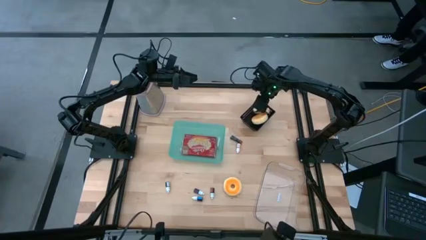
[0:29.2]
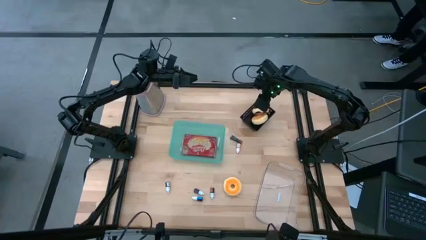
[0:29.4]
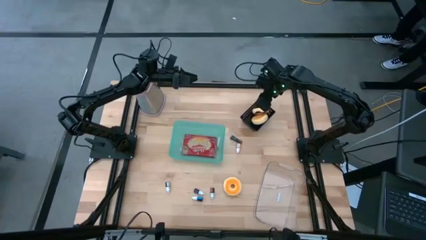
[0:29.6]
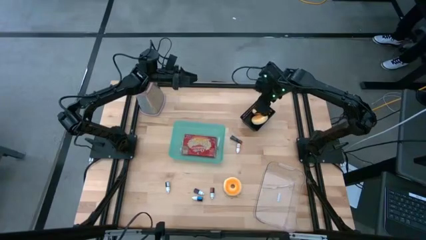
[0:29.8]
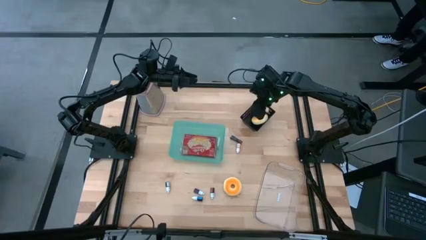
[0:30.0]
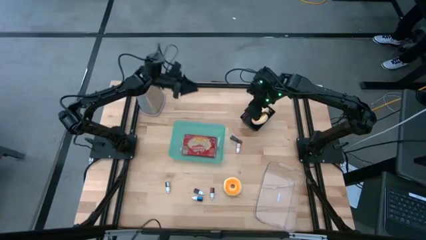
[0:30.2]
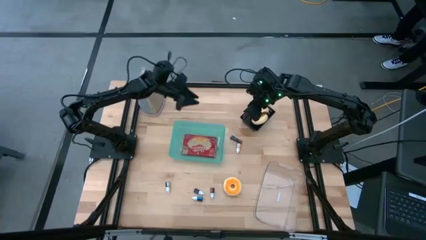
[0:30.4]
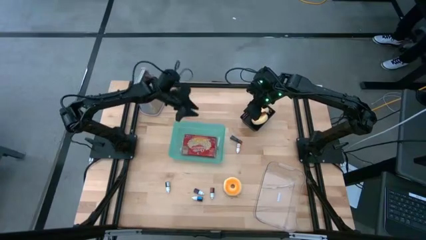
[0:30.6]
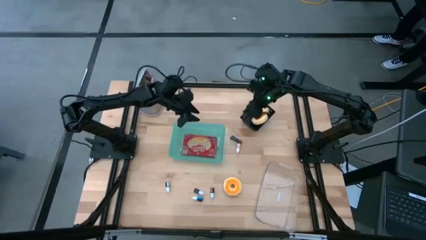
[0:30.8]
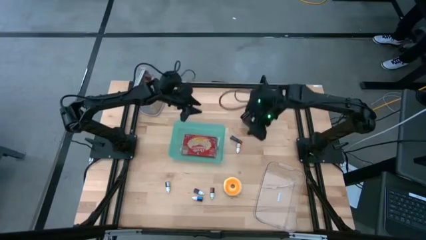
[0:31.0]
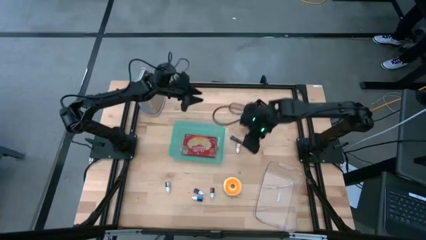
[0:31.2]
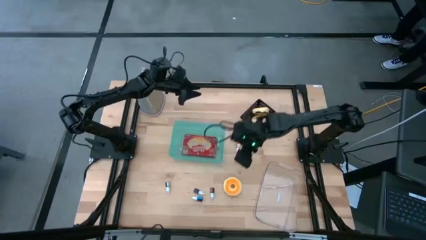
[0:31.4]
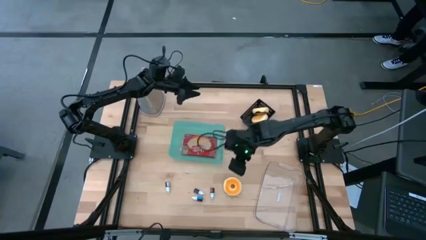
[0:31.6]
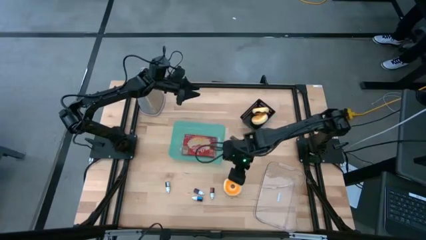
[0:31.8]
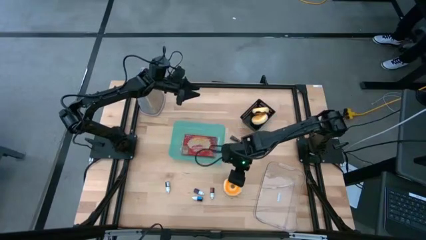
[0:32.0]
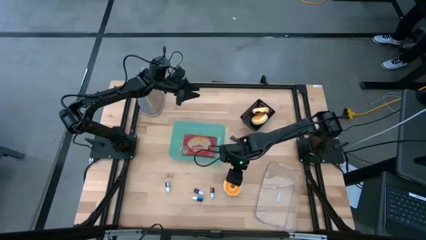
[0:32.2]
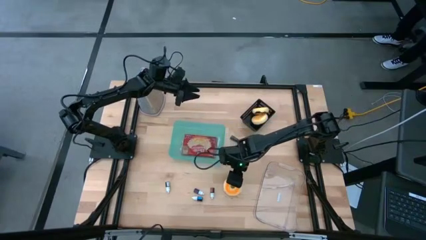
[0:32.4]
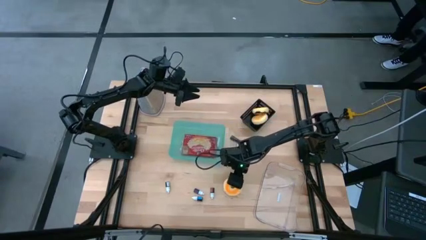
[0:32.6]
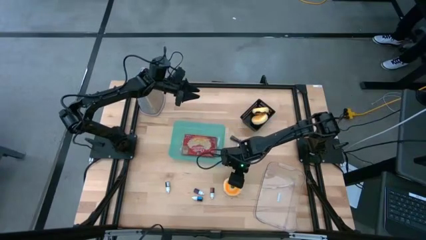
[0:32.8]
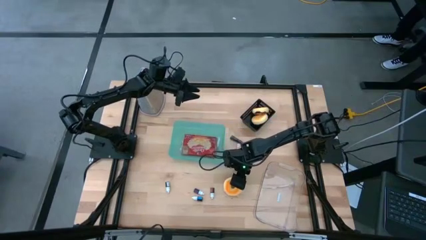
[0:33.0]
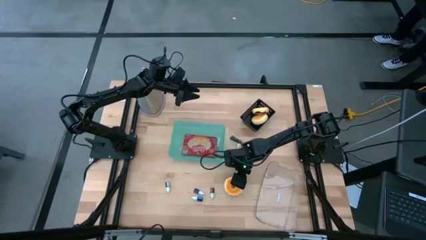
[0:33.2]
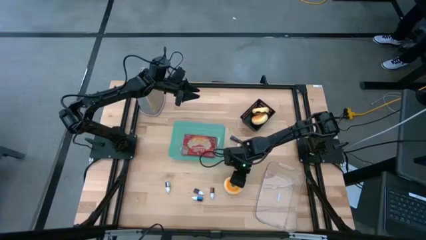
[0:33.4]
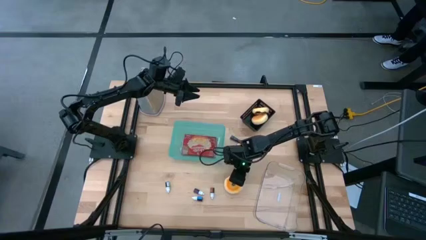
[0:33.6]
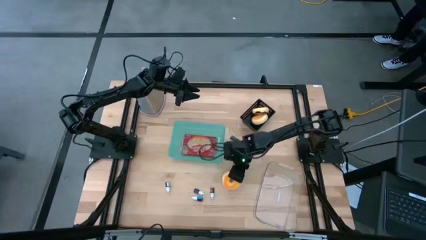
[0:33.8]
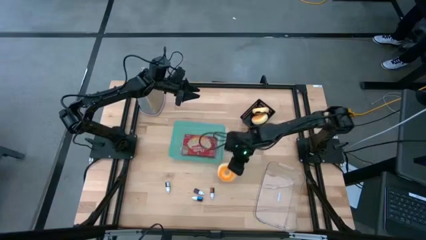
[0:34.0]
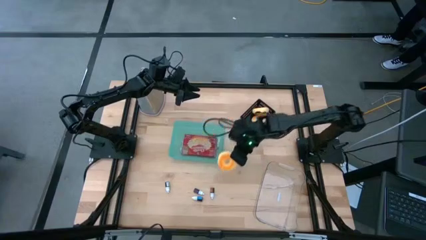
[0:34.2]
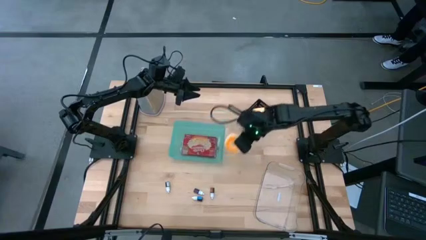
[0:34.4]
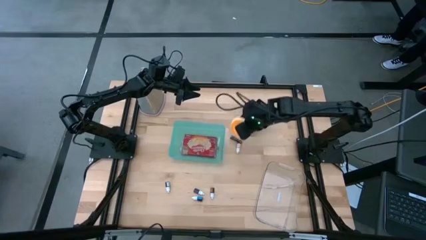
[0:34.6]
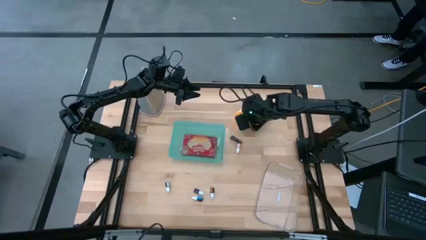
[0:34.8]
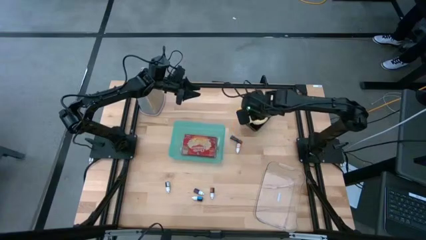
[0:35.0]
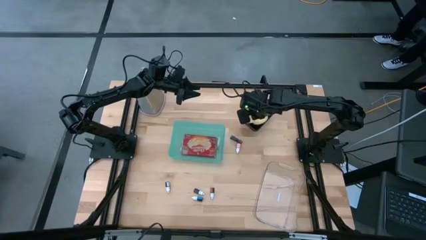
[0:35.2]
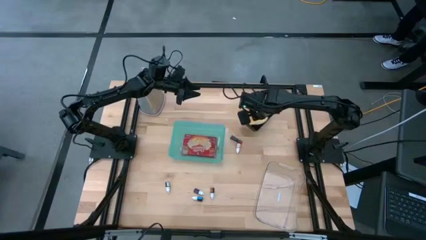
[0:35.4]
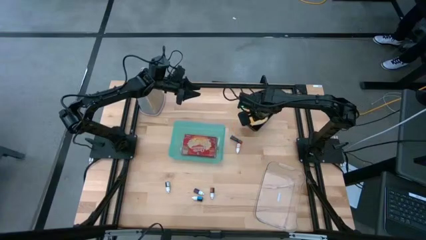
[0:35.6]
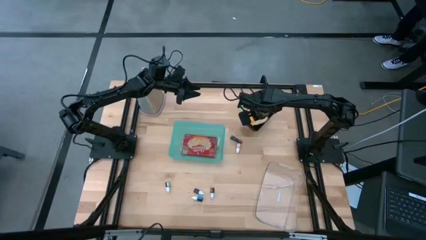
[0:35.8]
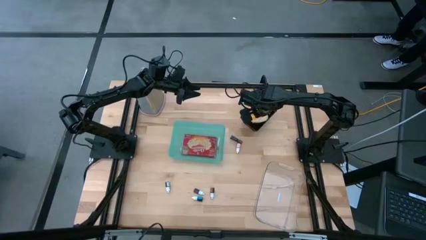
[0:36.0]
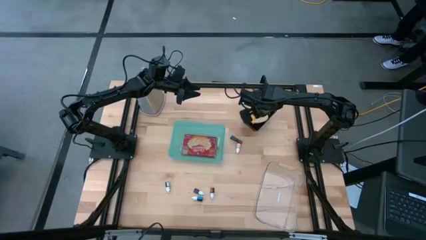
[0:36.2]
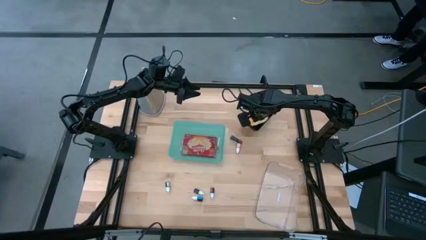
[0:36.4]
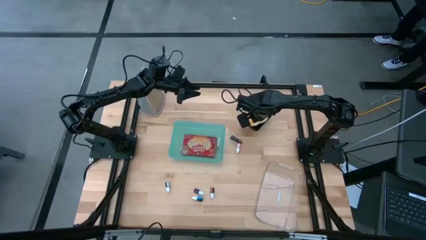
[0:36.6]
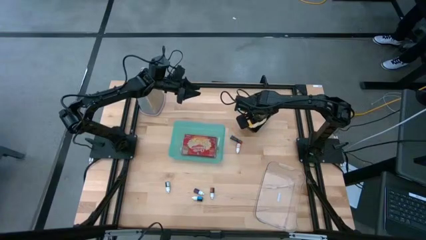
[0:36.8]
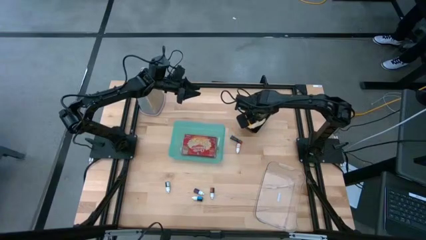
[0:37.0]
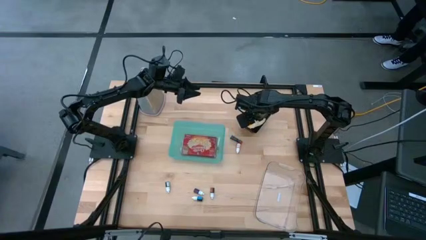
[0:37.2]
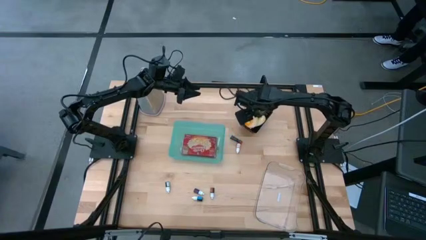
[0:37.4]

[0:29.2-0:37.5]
Put the white donut into the black bin

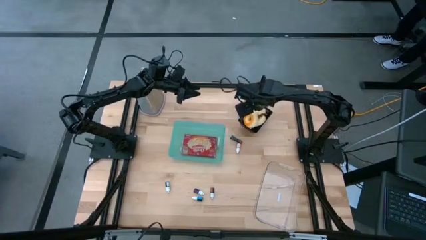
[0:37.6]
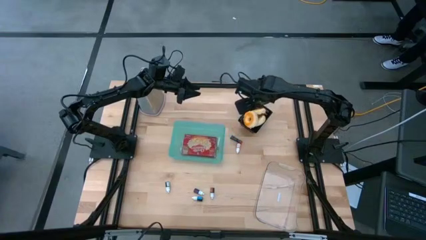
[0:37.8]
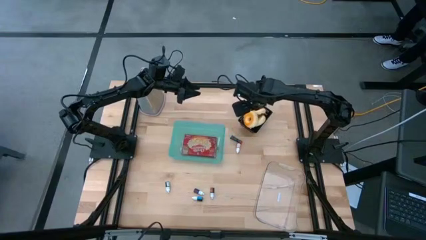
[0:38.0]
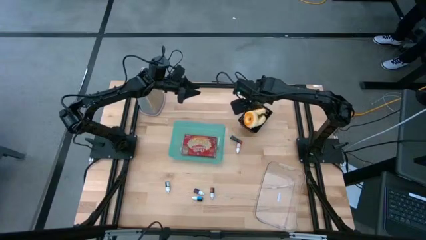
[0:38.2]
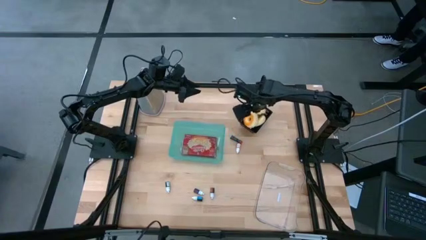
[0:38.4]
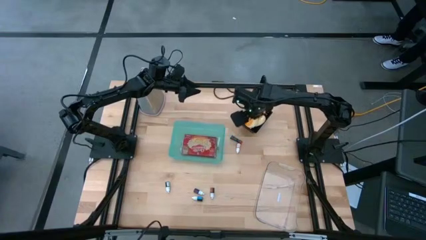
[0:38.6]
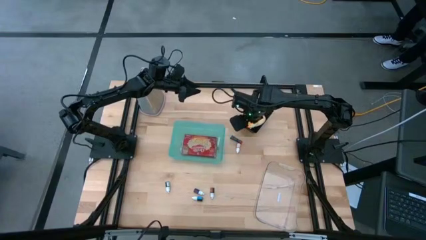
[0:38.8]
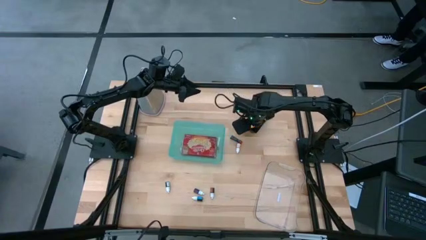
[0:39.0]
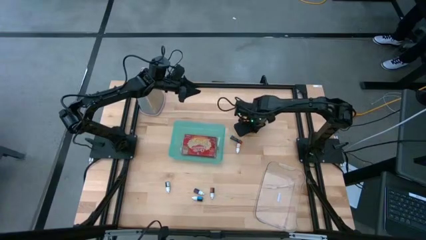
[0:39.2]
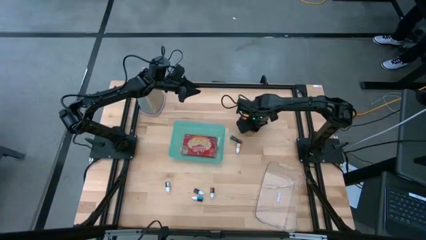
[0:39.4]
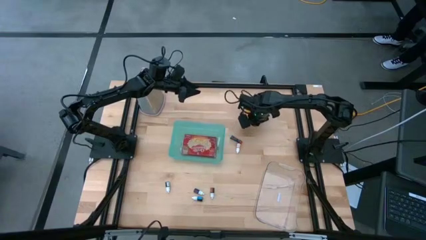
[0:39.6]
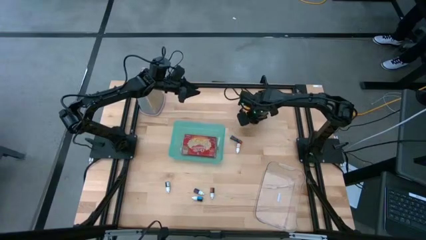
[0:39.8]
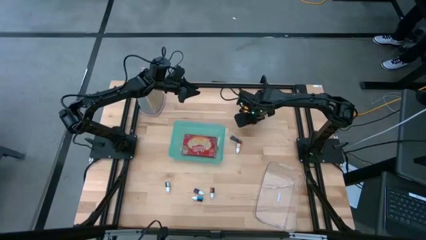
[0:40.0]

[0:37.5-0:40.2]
Adjust the black bin

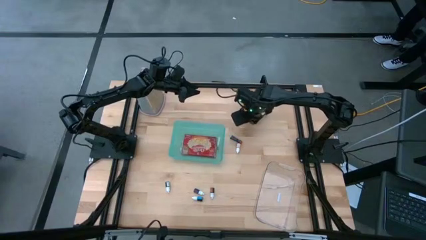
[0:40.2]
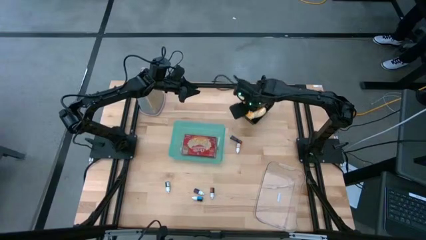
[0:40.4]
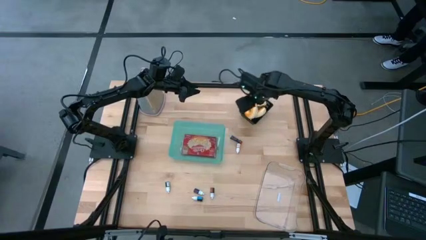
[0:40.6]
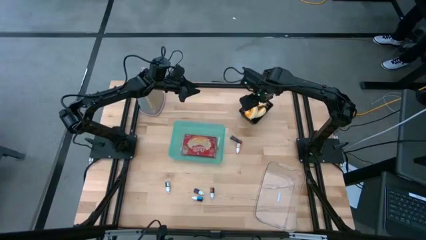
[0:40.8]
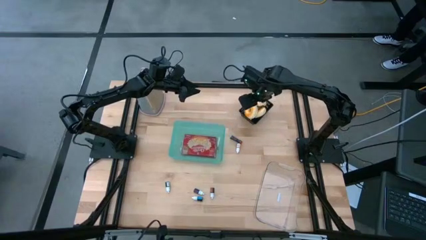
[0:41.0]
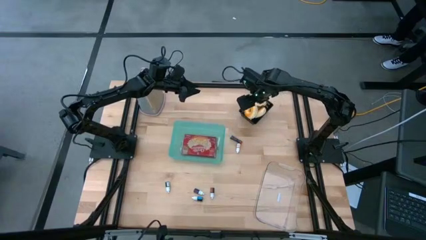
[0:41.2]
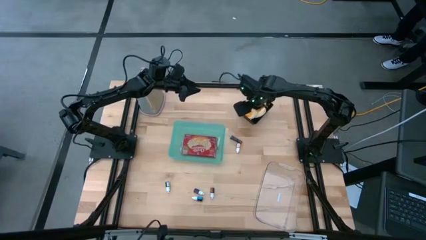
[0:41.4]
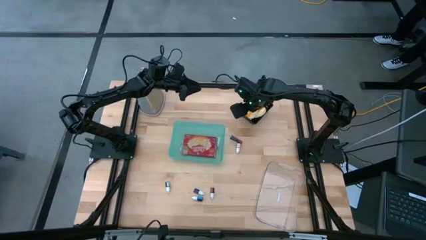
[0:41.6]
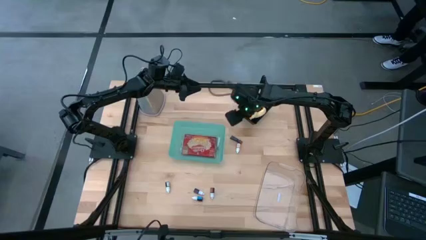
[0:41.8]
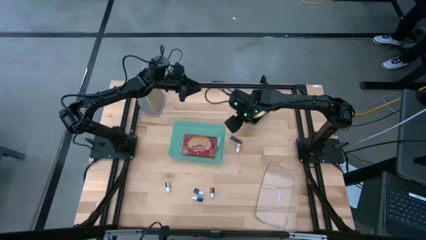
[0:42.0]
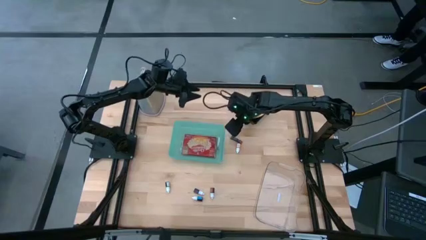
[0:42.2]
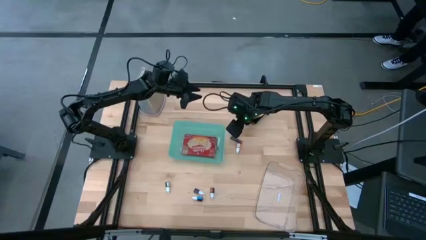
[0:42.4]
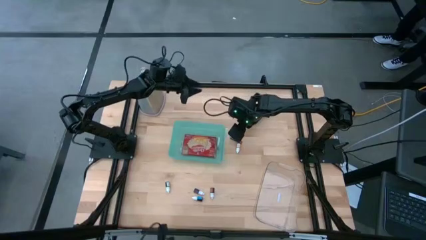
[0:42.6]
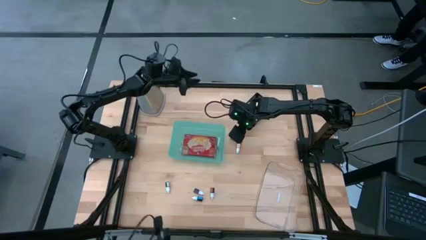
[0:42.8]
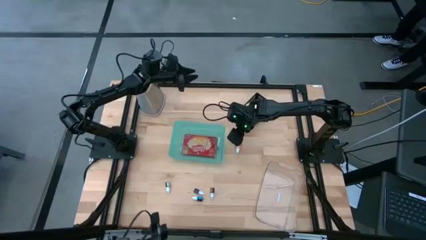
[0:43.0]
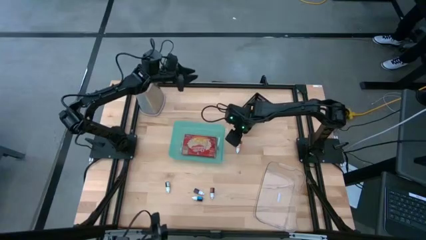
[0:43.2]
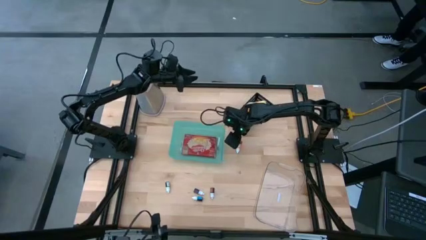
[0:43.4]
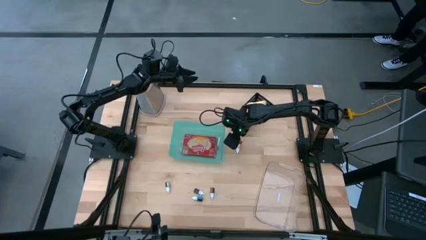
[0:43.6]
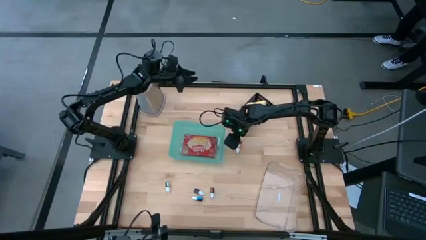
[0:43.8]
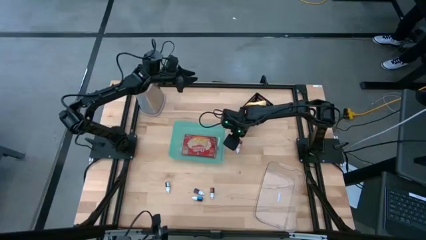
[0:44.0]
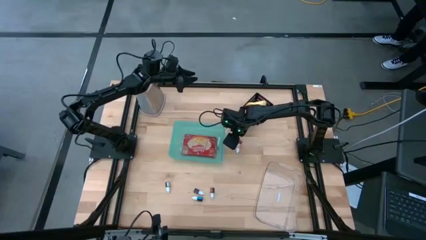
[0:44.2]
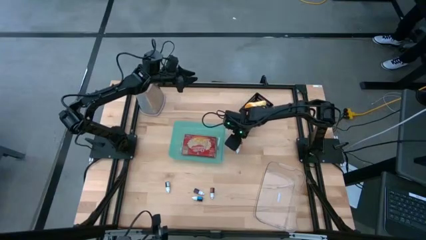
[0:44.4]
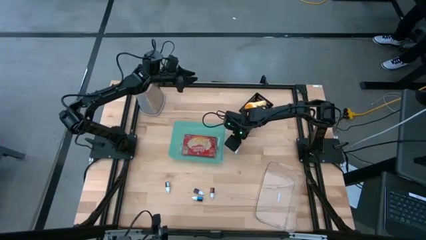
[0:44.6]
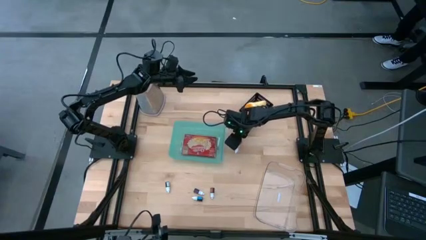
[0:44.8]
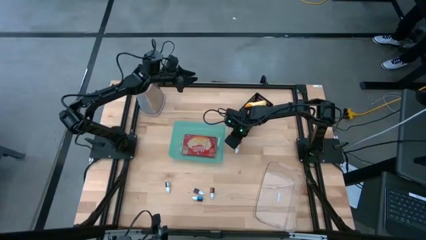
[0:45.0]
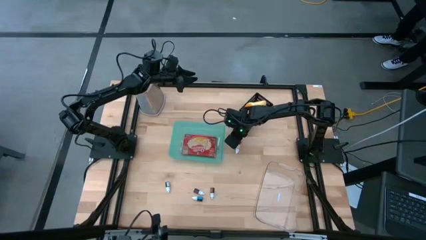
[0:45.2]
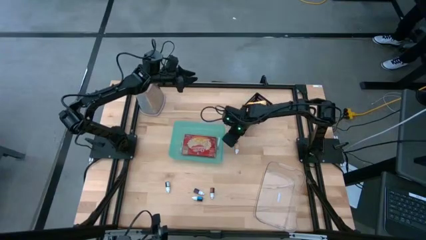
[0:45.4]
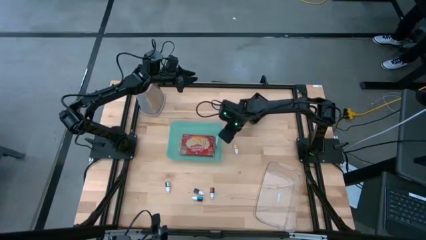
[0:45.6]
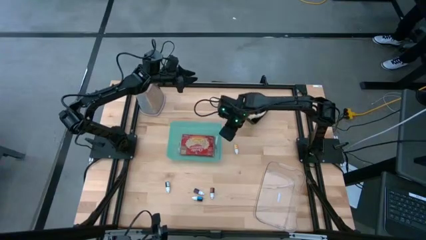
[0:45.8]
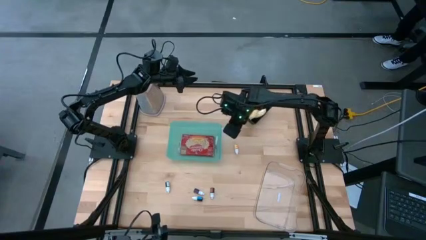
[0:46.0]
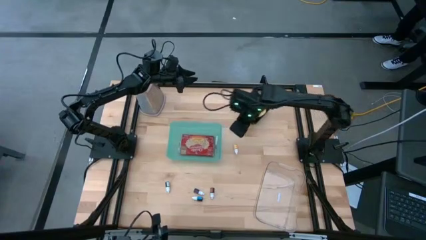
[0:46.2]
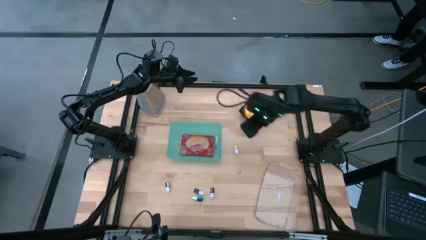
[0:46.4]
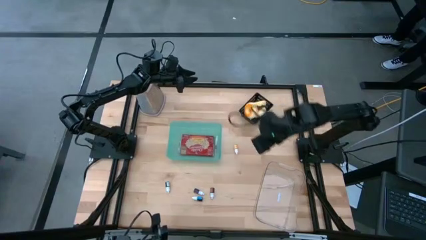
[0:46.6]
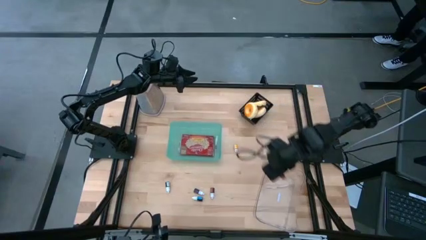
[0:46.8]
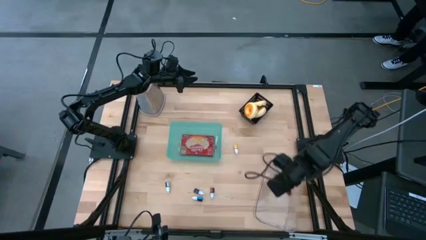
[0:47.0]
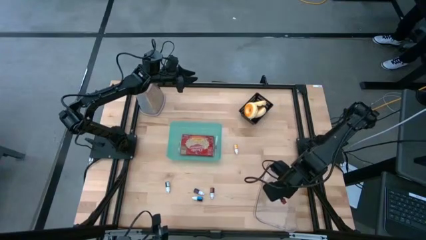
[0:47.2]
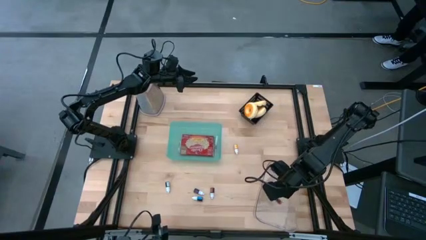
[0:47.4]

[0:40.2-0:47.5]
Put the black food coloring bottle into the transparent bin
